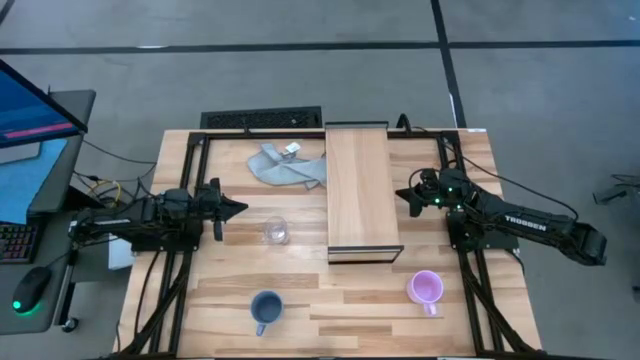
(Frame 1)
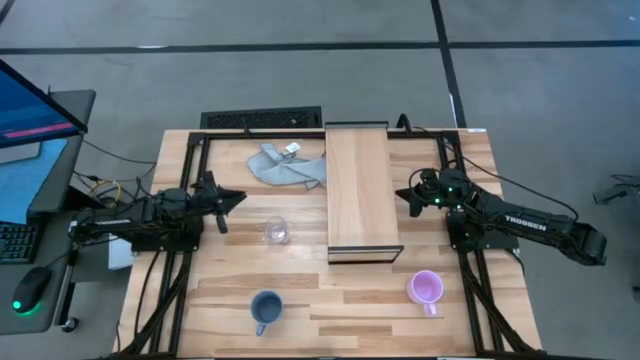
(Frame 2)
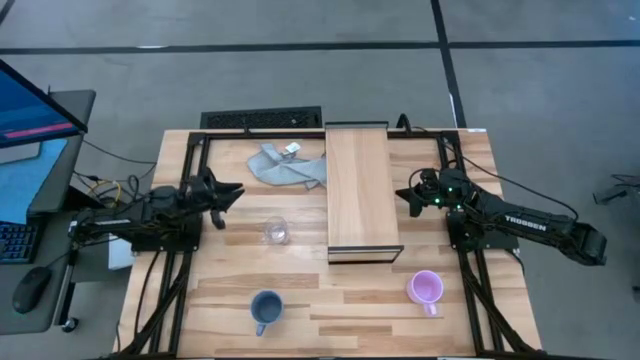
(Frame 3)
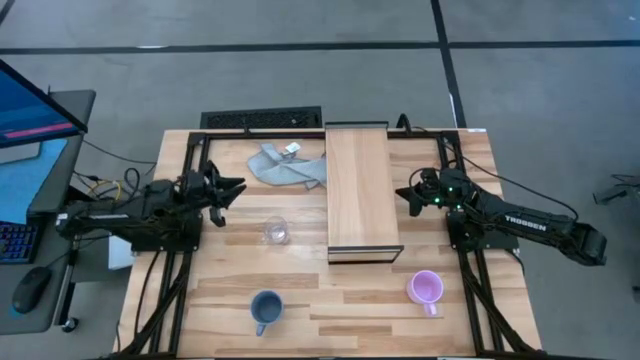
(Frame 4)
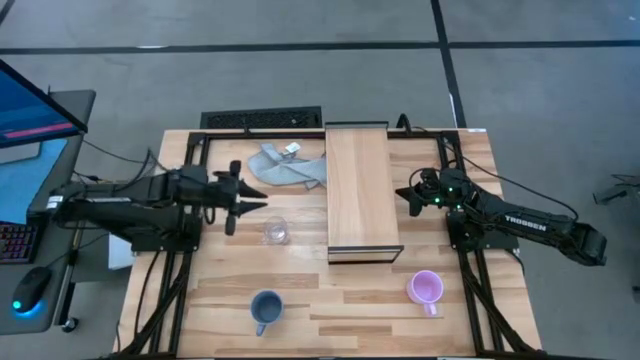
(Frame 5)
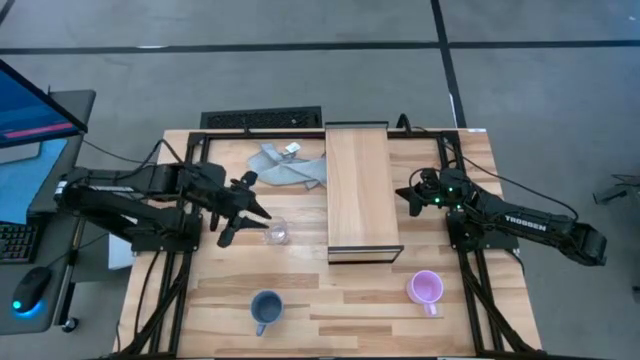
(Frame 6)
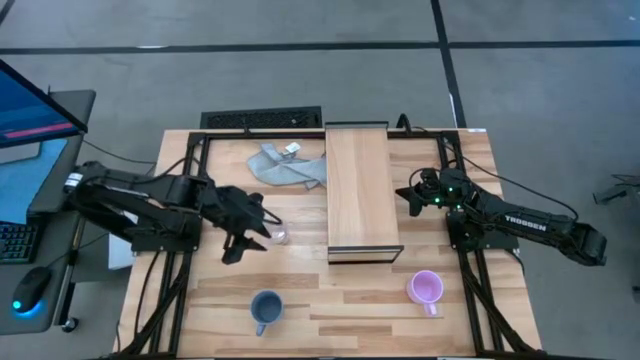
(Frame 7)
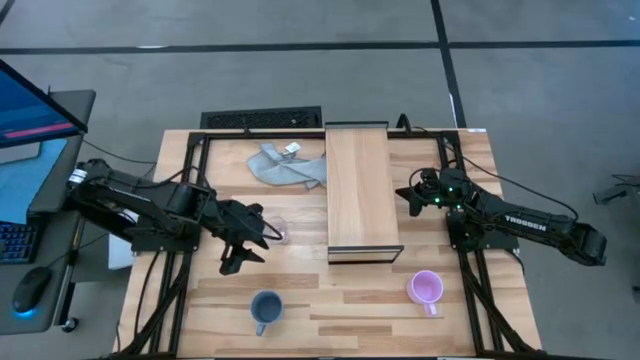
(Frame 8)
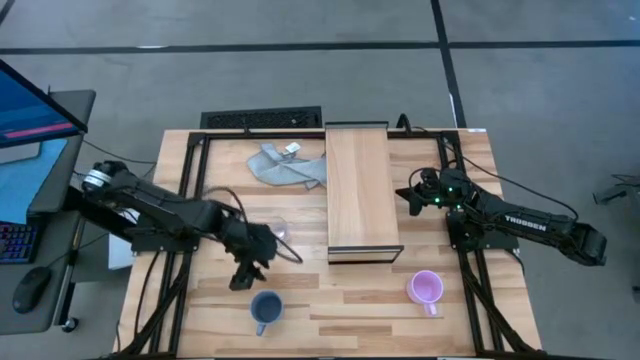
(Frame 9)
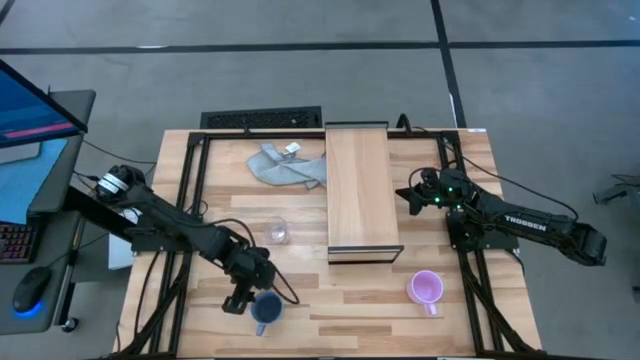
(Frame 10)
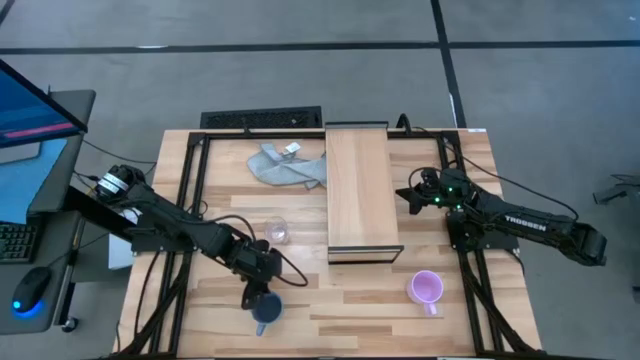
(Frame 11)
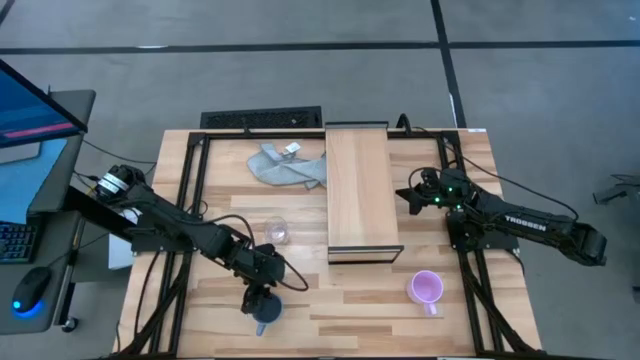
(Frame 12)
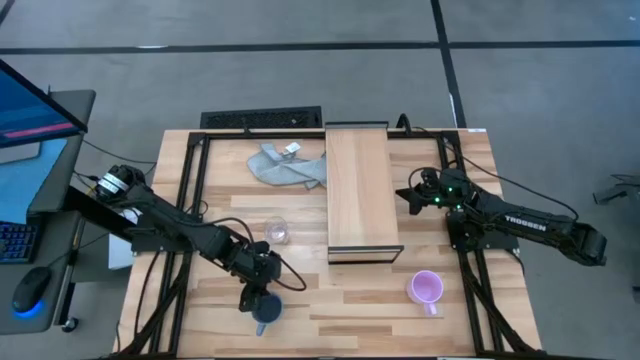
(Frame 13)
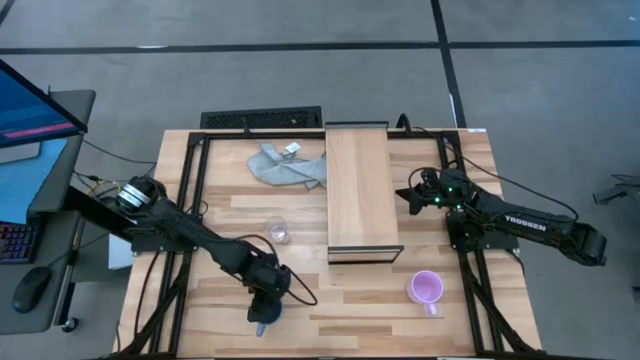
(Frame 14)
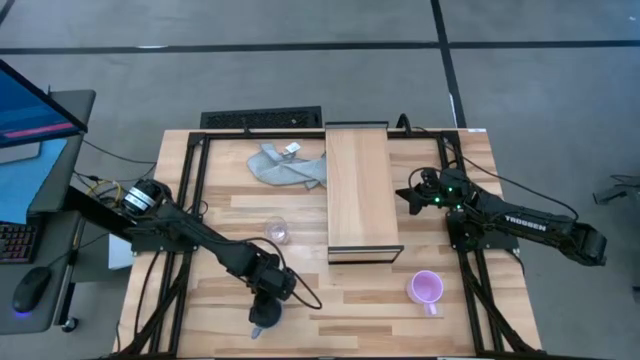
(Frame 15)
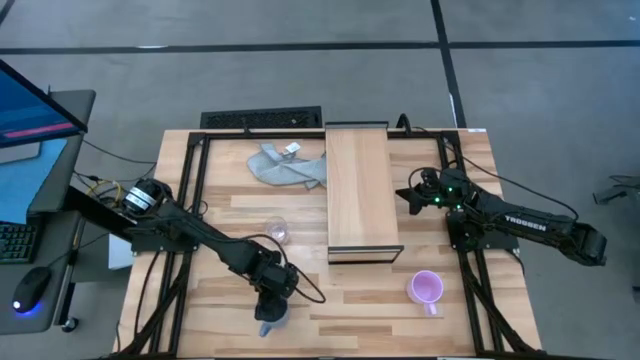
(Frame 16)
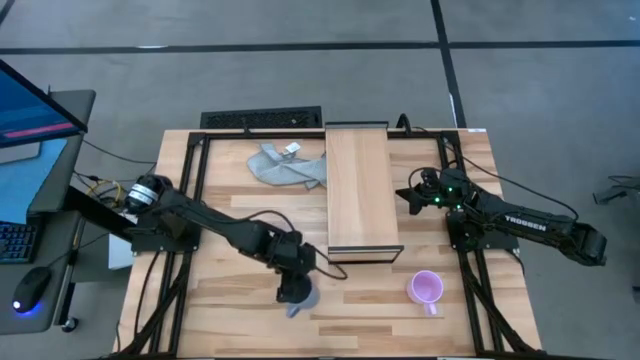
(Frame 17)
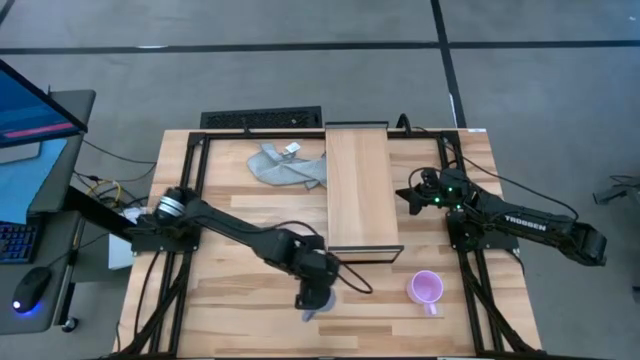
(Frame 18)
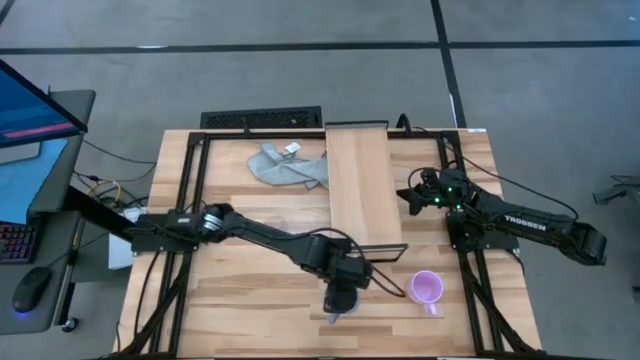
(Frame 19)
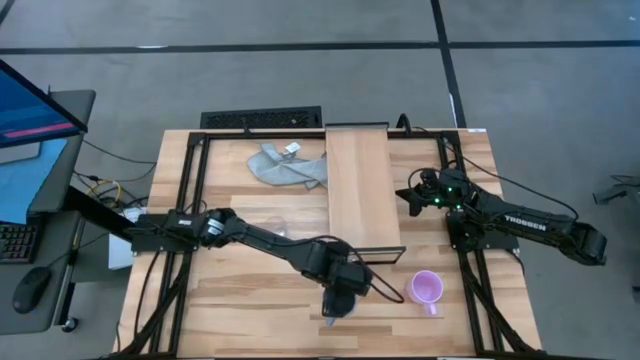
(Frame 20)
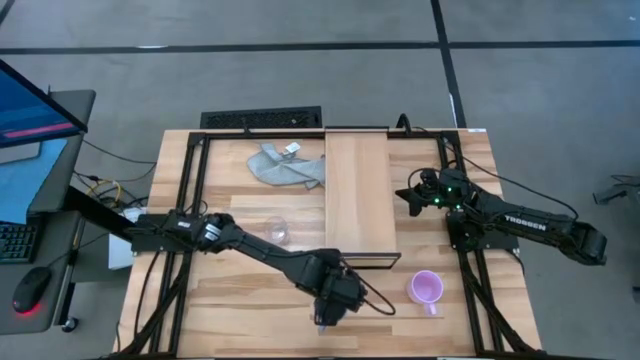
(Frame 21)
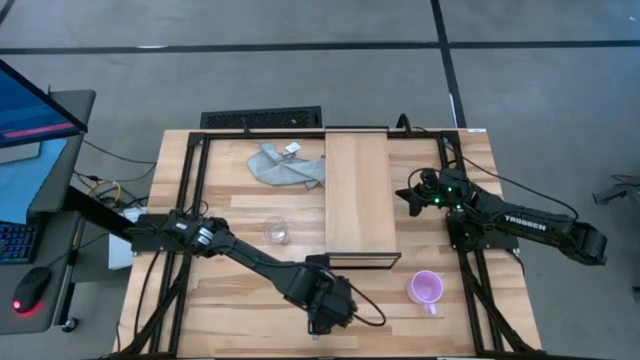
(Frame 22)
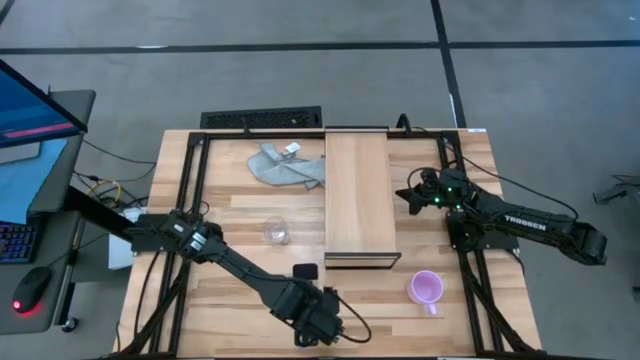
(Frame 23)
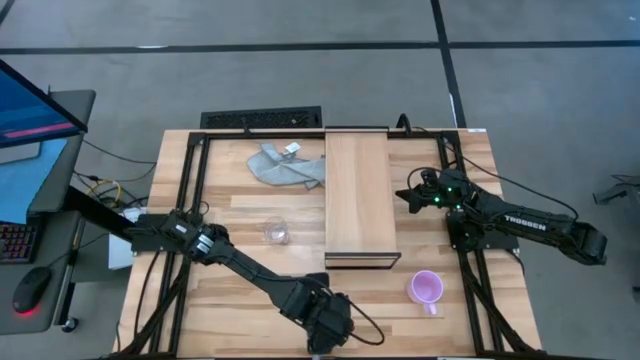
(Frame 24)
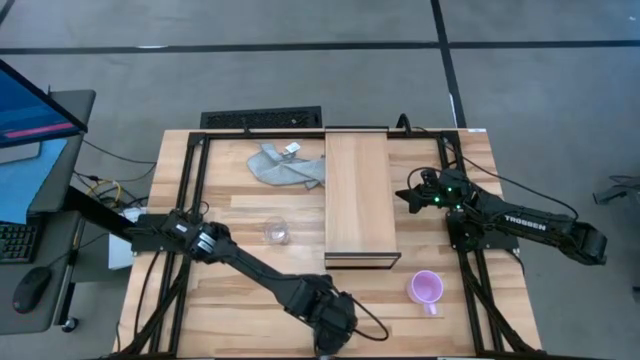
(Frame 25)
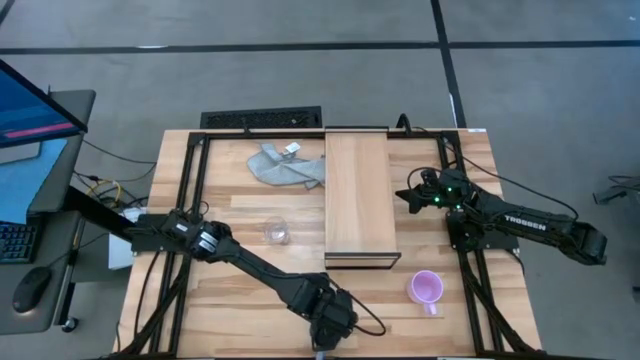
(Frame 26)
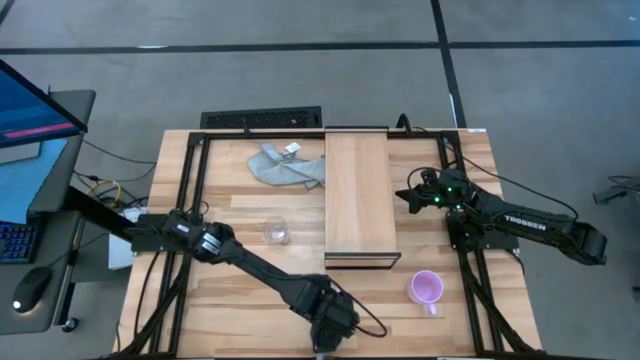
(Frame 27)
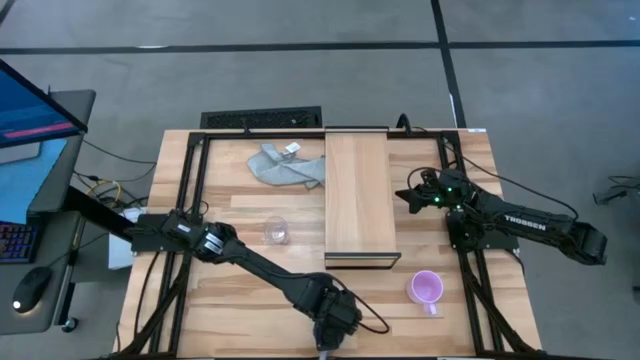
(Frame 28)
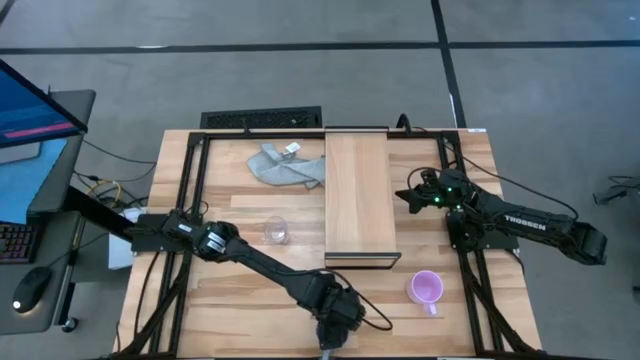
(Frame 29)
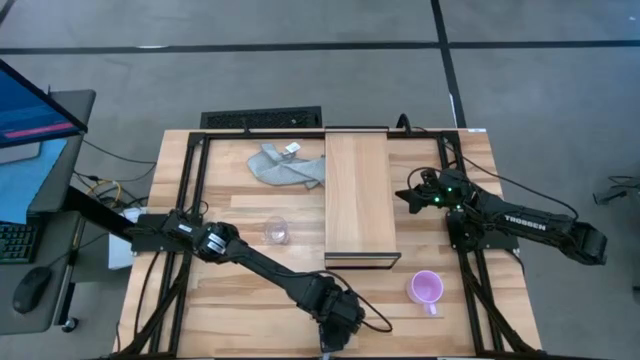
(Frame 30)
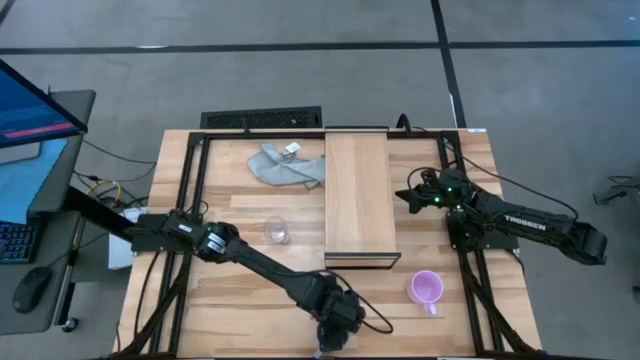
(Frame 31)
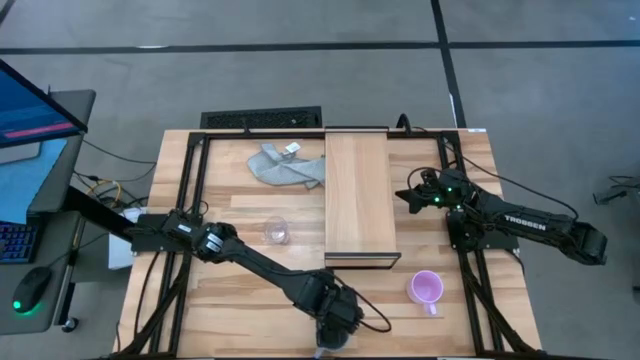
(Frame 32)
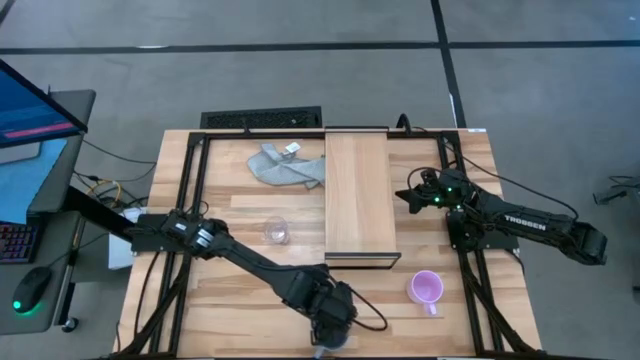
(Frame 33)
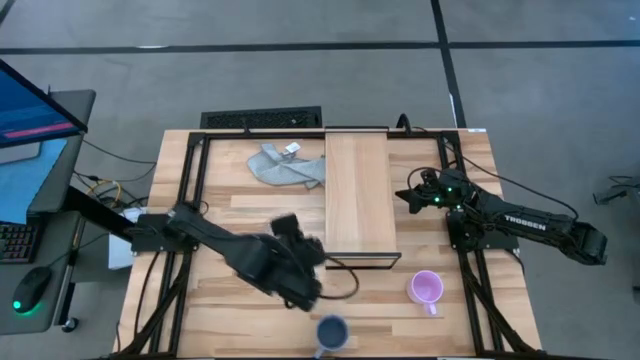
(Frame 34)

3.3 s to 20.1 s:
Task: Stack small to large cups/mugs on shelf
Put the blue mug on the shelf
